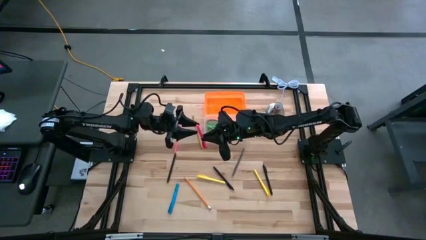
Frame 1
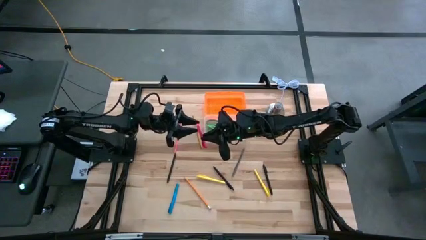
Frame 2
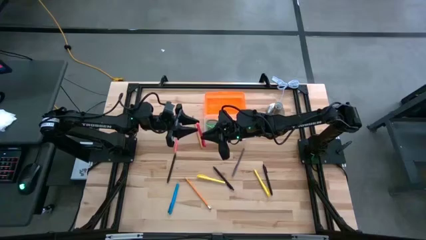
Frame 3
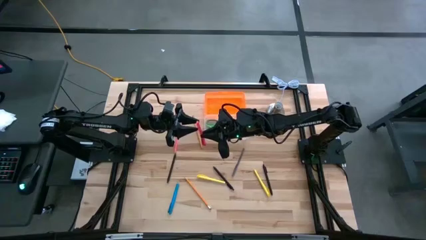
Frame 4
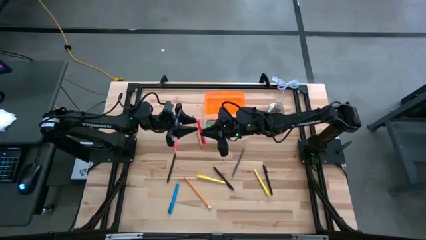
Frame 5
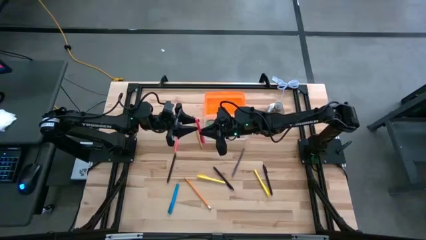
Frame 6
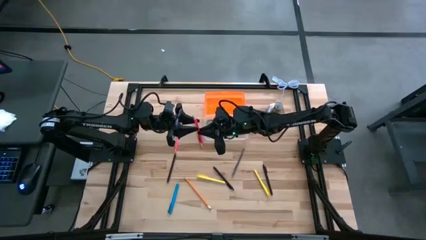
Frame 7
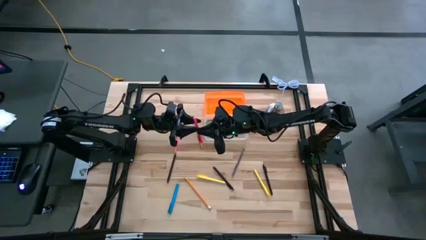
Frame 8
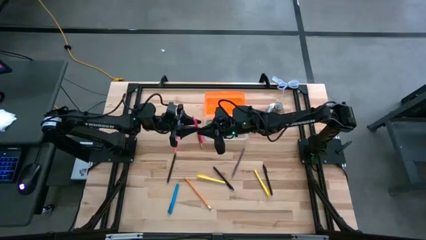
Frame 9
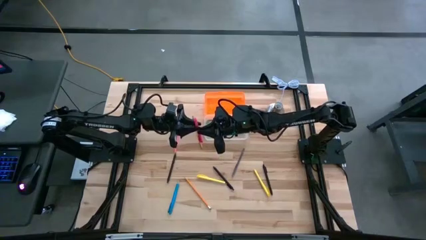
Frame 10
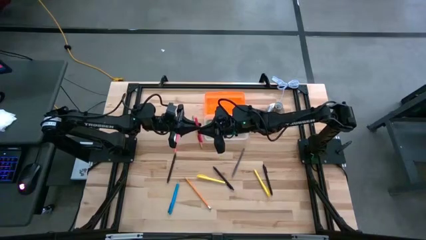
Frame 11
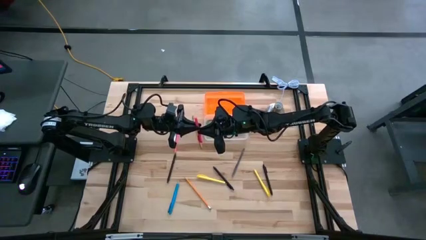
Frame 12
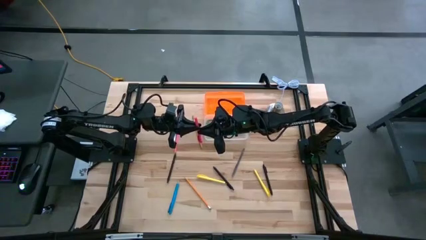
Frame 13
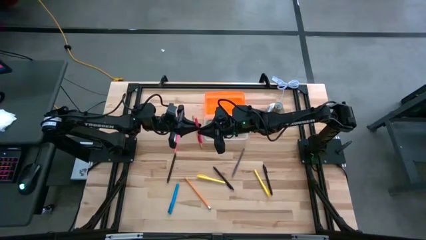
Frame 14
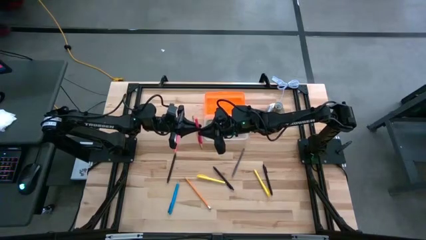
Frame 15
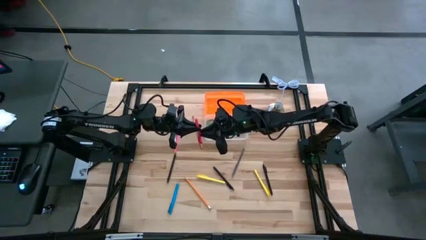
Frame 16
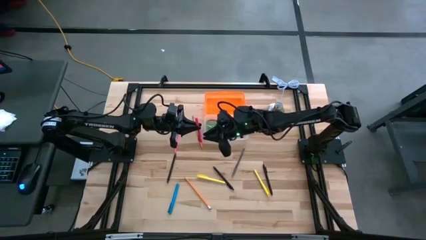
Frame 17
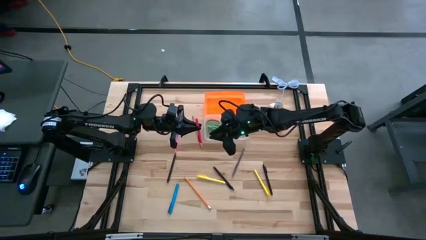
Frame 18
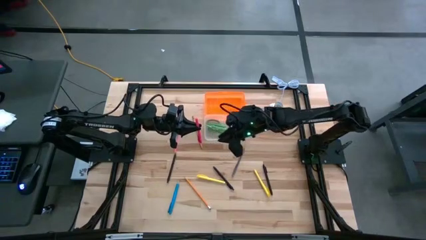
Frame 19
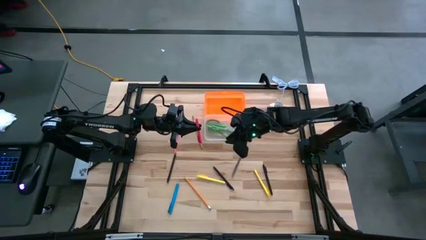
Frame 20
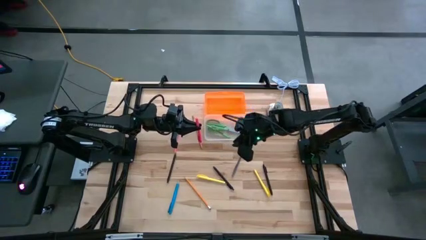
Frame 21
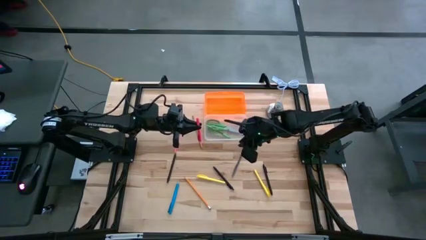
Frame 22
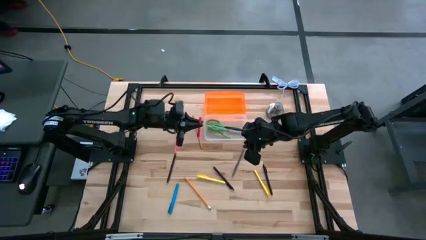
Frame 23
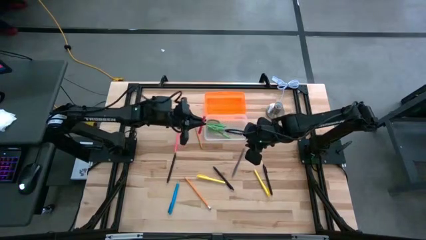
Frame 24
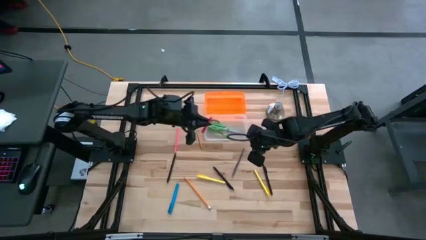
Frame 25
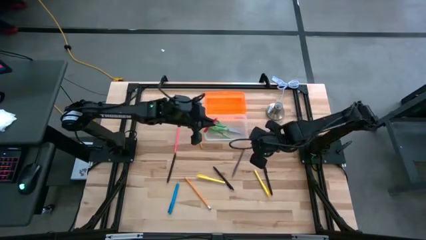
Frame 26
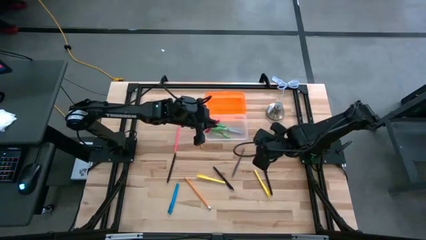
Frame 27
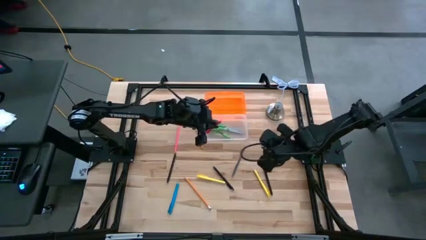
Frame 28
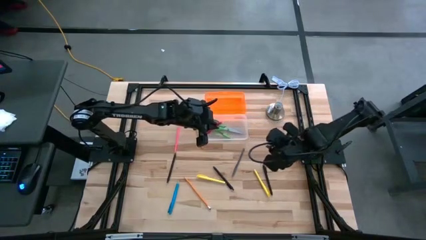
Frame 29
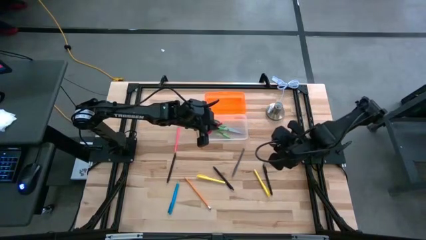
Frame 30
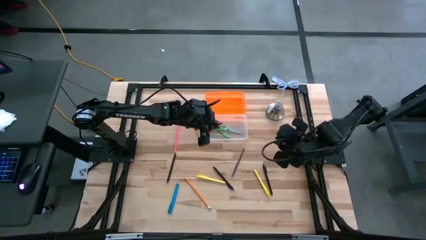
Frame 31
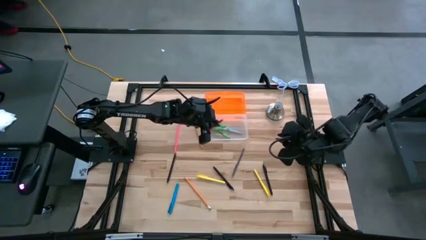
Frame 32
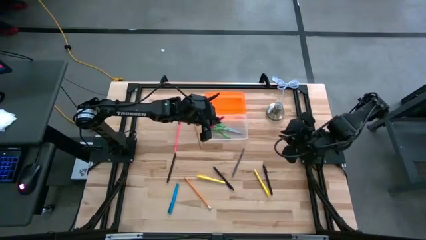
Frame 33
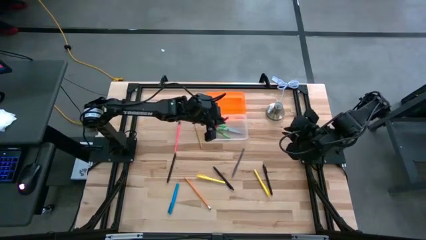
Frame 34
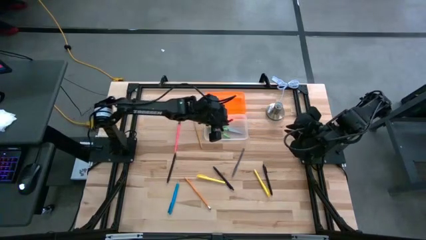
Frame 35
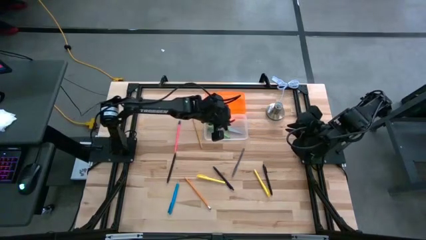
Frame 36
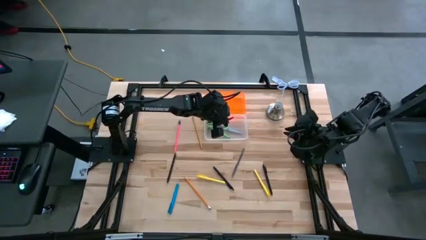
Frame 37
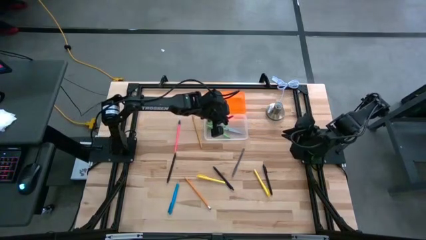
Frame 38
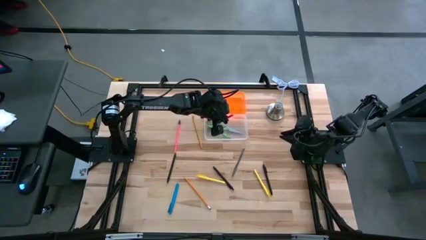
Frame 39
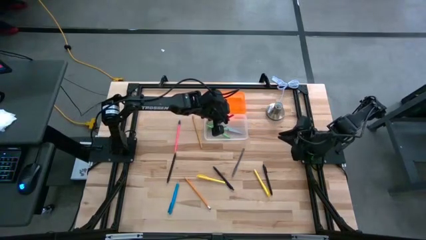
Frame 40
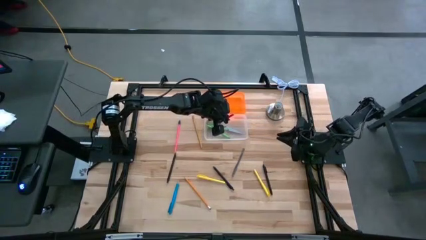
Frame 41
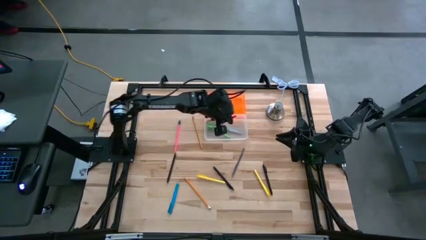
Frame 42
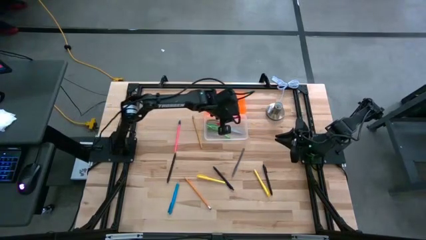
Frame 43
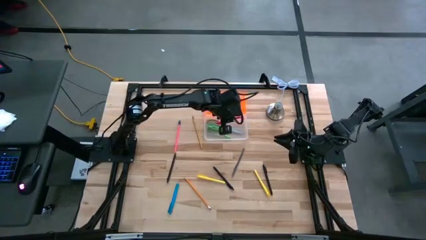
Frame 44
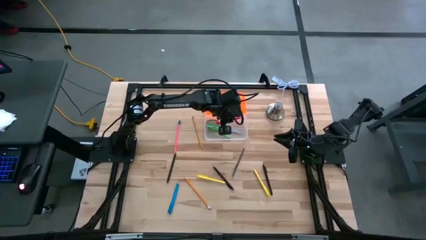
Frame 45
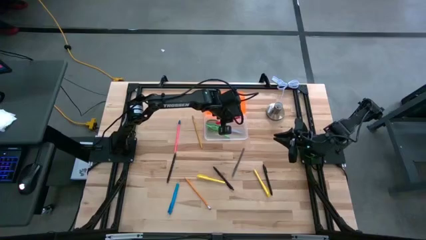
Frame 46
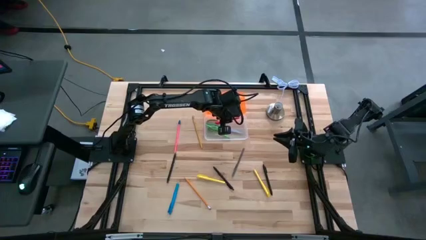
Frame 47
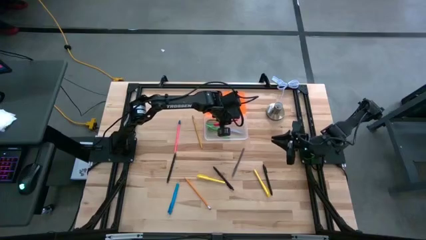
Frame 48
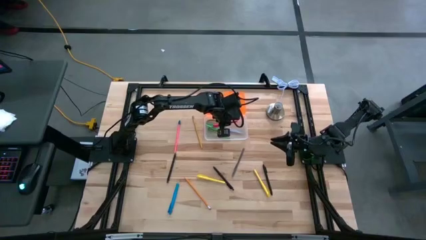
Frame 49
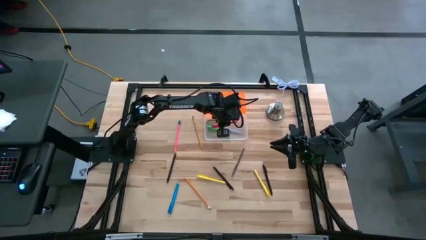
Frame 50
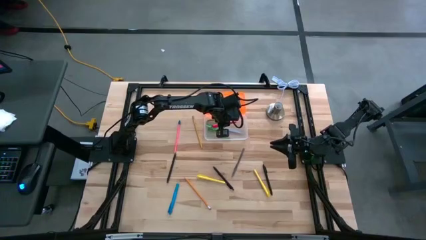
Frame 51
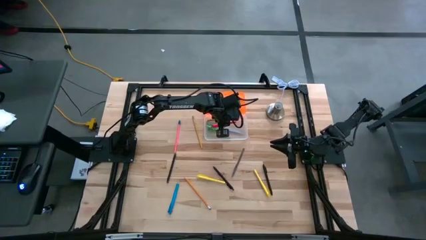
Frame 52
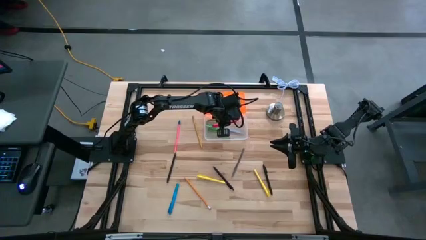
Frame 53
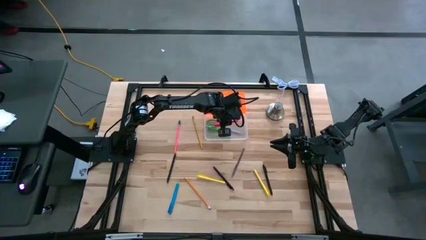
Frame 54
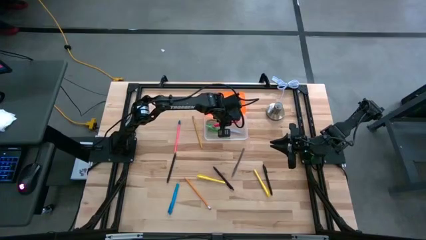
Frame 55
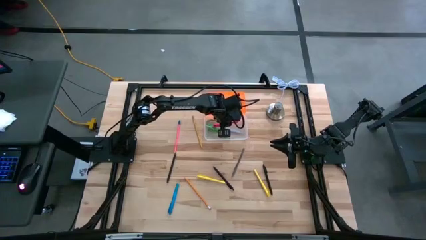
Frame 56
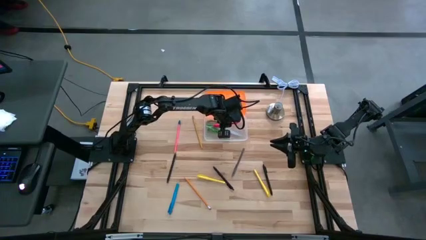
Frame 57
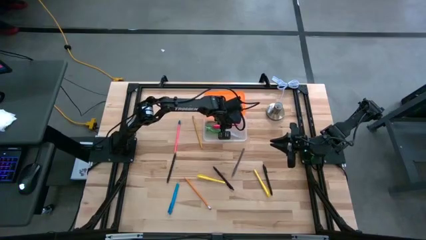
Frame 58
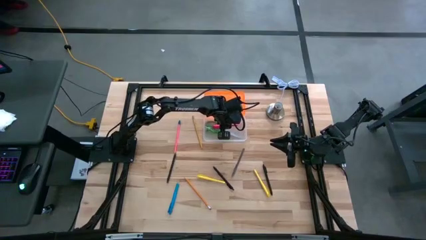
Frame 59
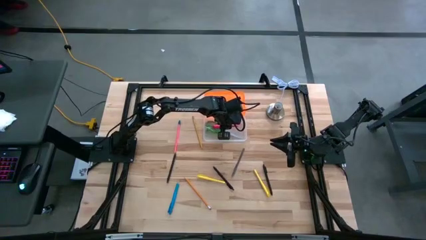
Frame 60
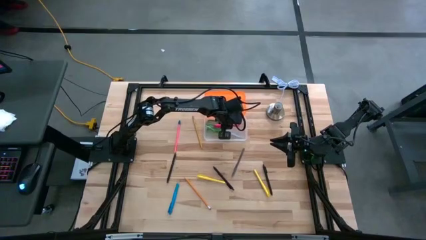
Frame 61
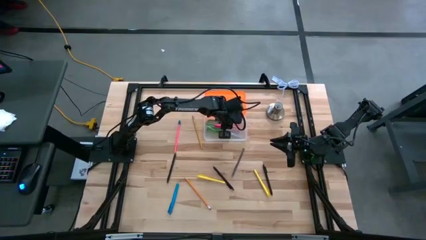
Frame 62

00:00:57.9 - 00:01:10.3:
Task: Pick & place school supplies into a supply box
Put the pink highlighter into the supply box

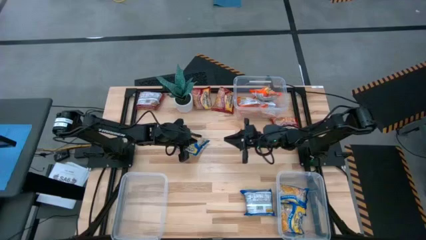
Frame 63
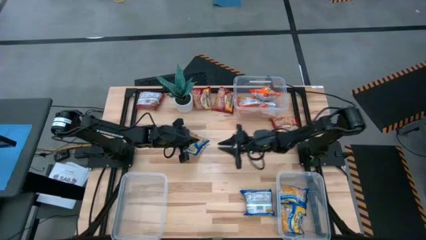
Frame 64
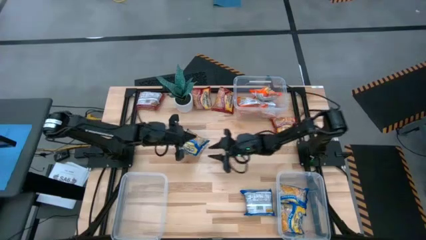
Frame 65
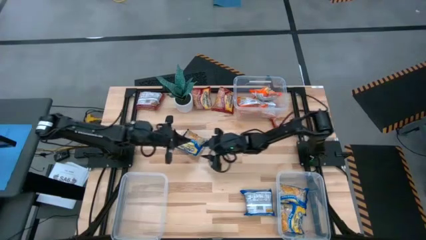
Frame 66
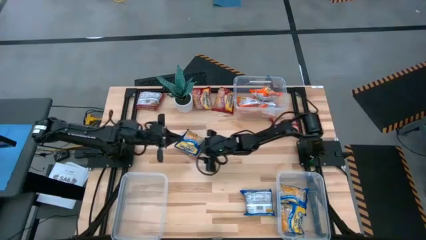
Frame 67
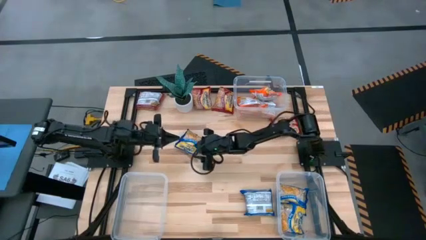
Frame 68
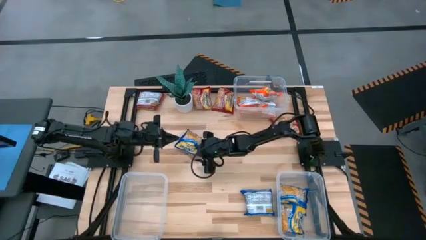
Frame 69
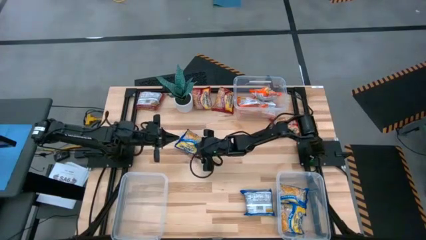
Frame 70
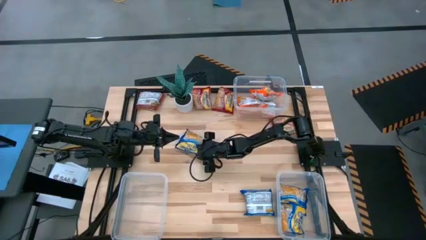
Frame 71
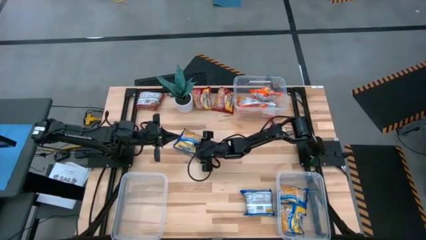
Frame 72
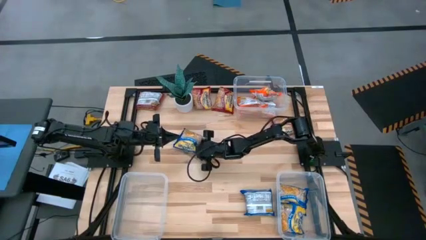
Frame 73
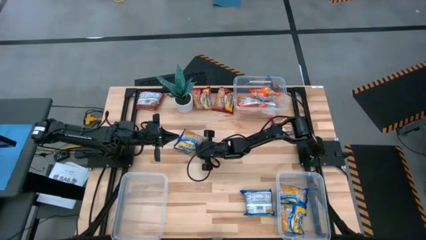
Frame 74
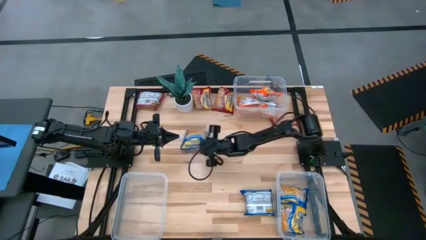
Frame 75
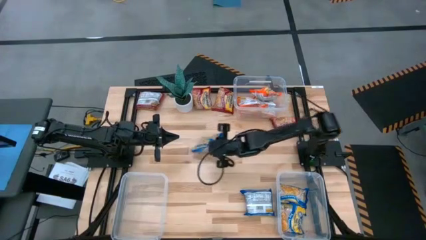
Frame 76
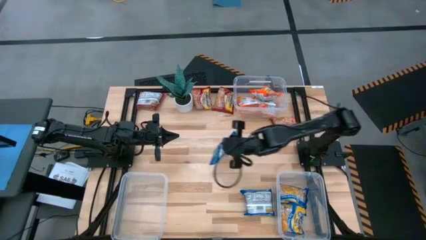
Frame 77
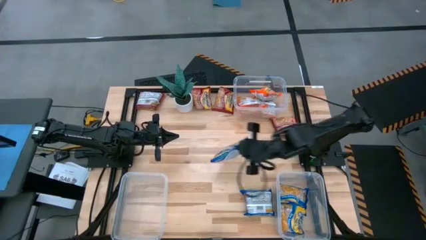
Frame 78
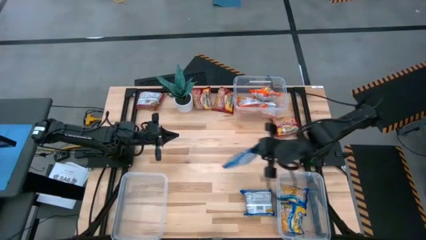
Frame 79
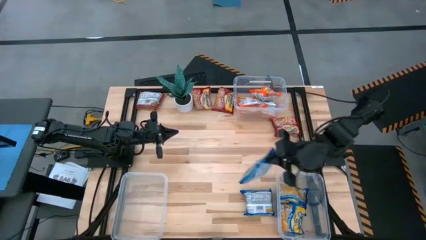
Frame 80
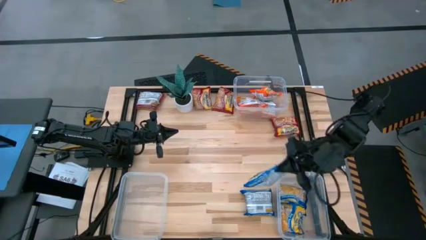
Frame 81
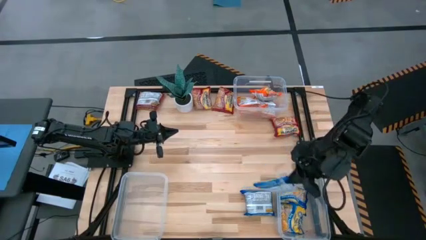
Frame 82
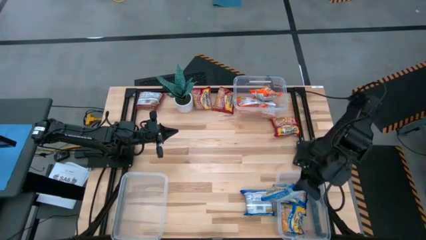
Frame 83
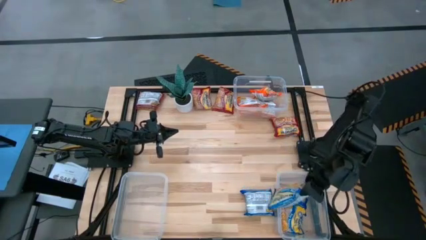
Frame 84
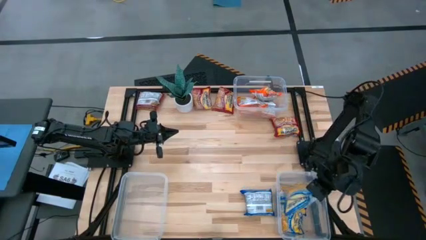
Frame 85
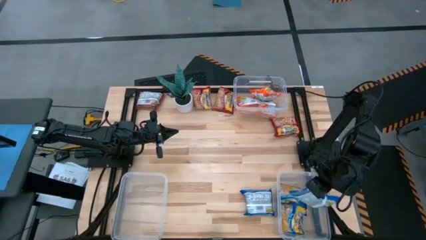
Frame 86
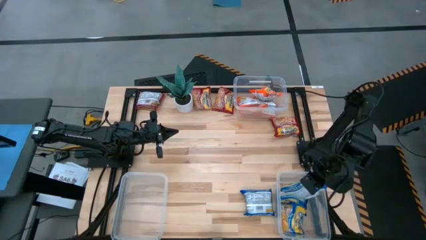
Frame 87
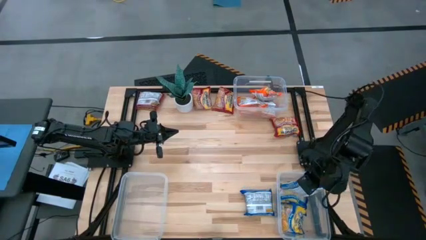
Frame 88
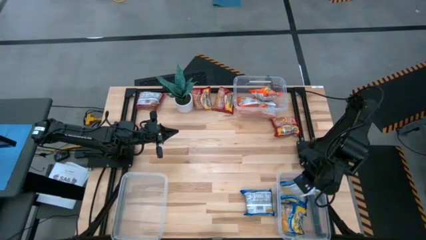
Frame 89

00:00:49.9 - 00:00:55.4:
Task: Sort Maruchan noodles
Put the blue noodle pack into the bottom right transparent bin
